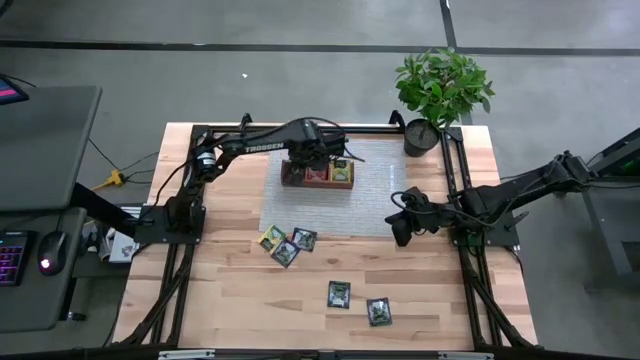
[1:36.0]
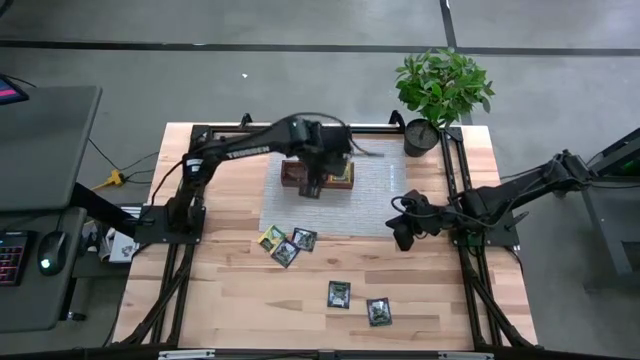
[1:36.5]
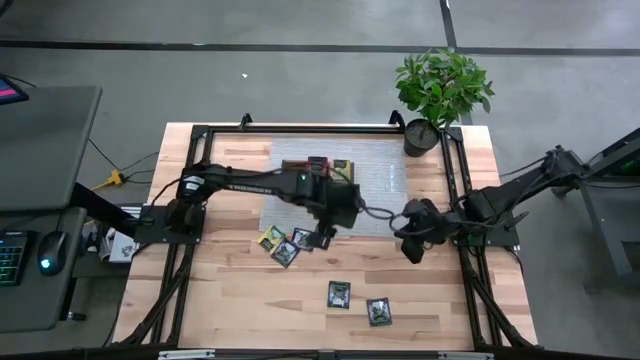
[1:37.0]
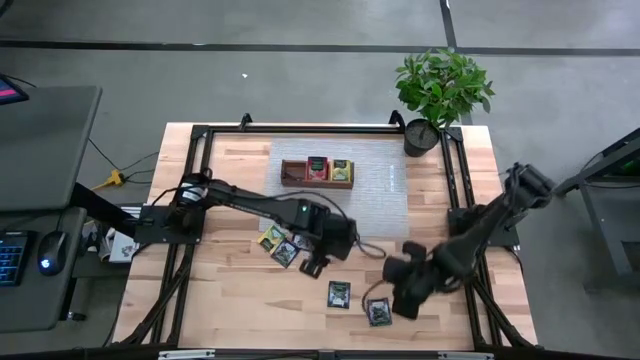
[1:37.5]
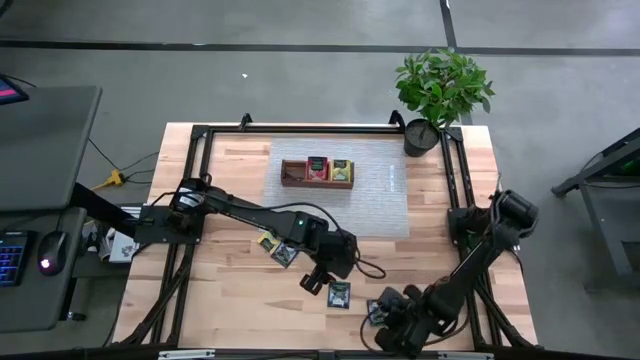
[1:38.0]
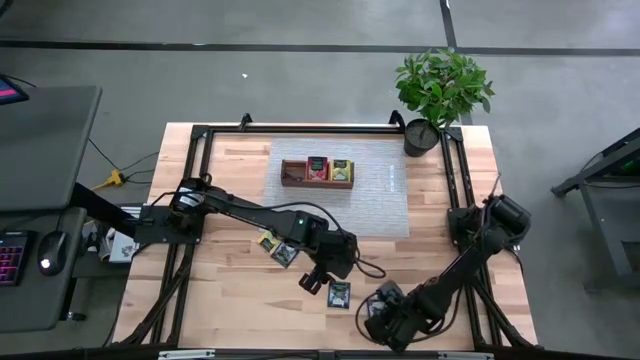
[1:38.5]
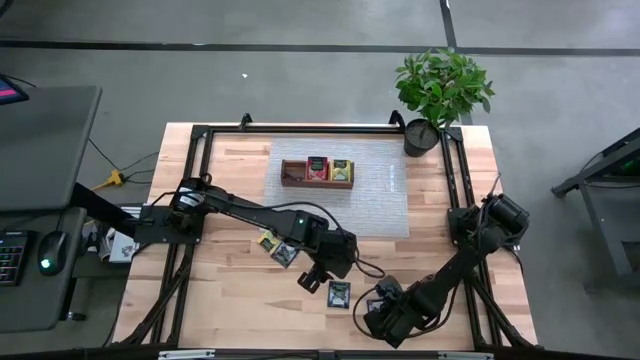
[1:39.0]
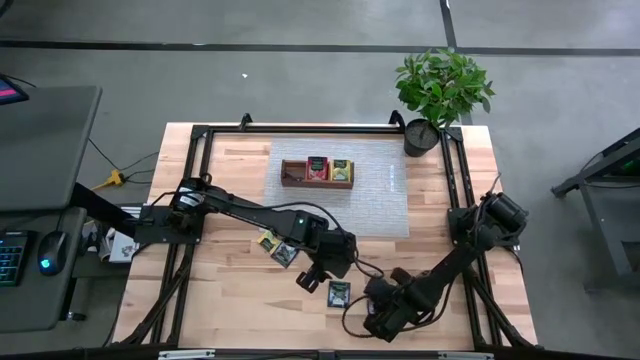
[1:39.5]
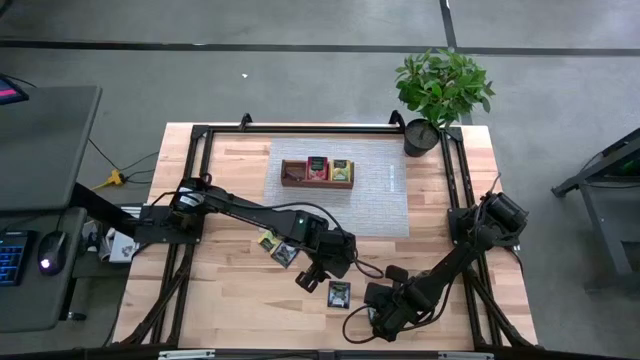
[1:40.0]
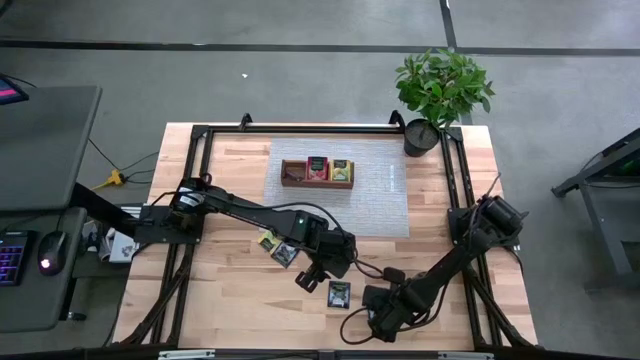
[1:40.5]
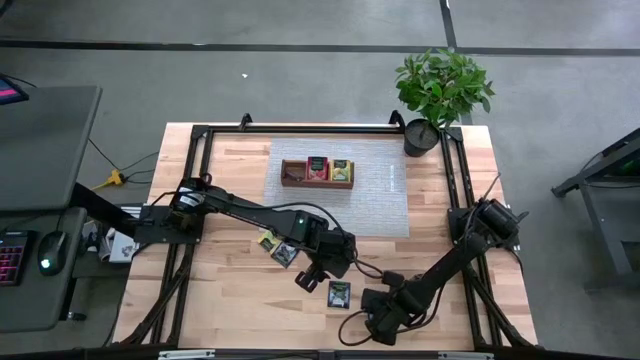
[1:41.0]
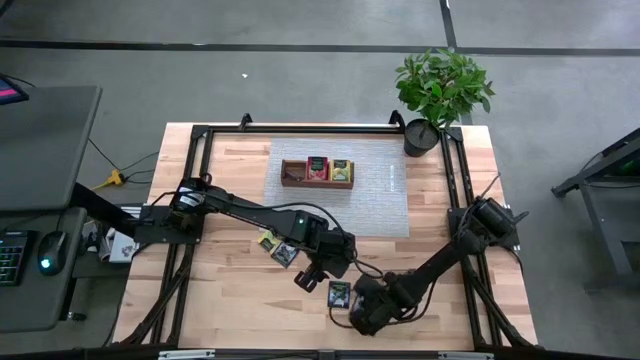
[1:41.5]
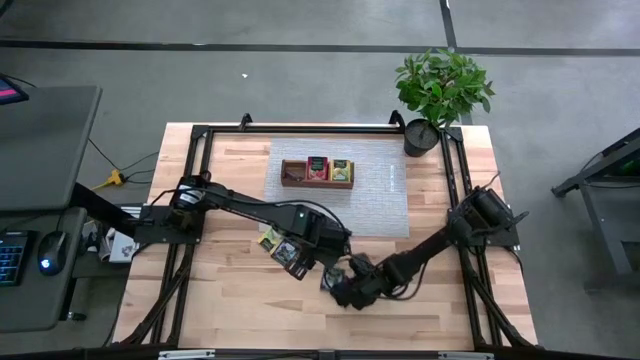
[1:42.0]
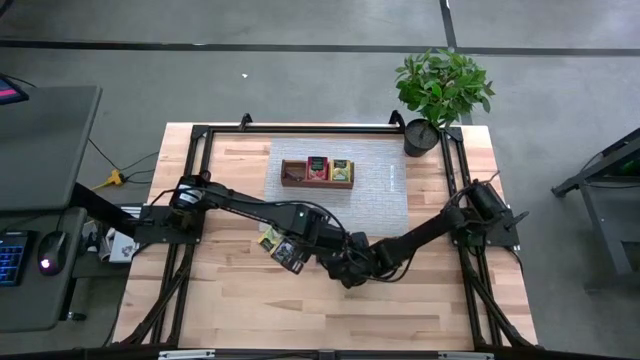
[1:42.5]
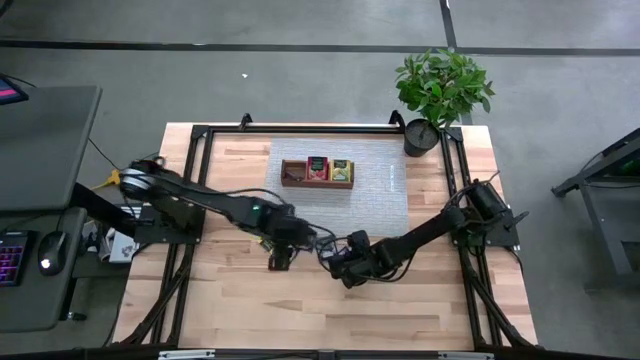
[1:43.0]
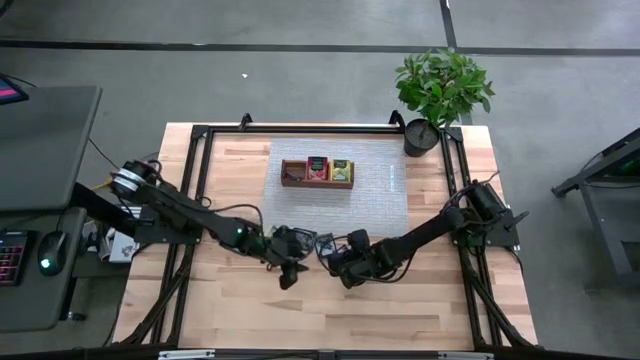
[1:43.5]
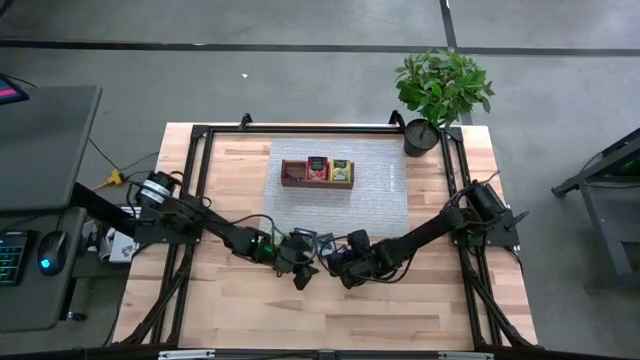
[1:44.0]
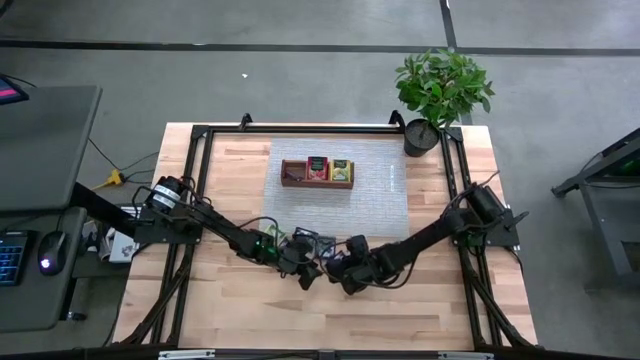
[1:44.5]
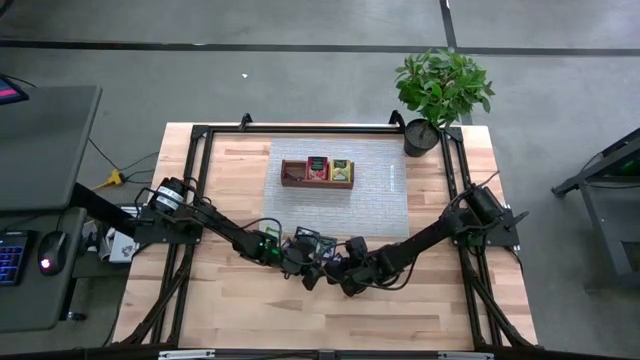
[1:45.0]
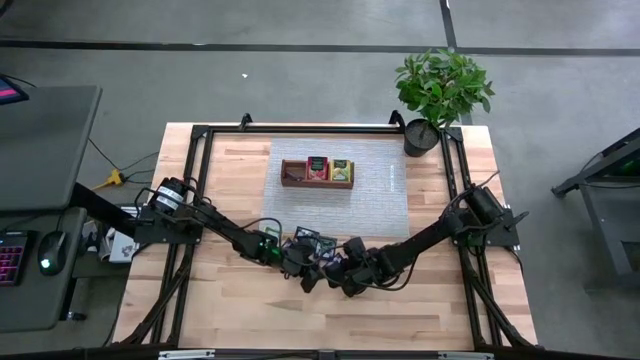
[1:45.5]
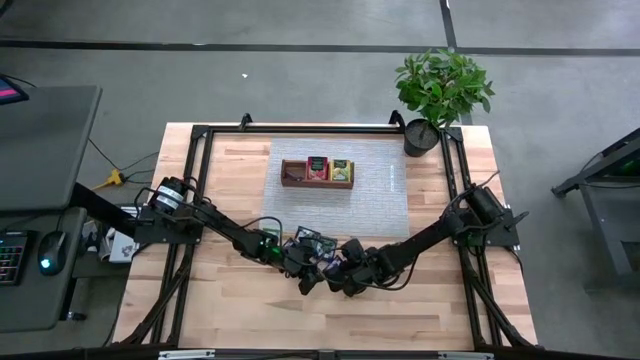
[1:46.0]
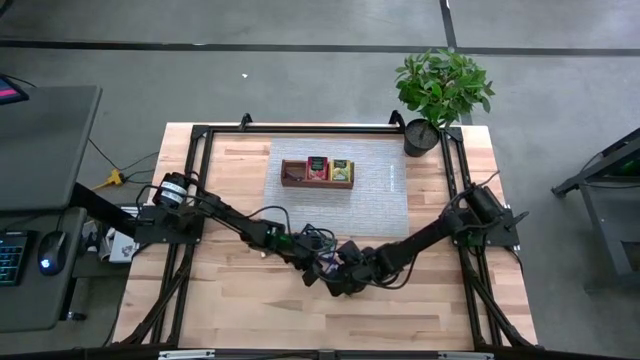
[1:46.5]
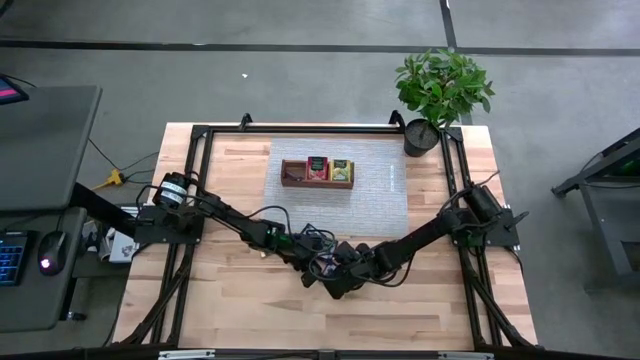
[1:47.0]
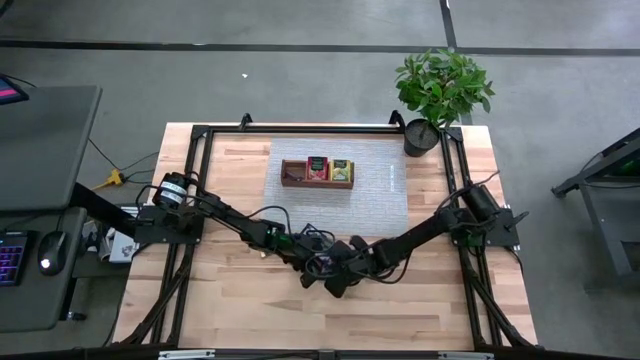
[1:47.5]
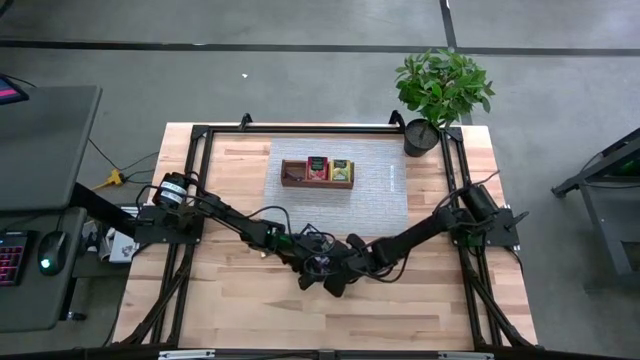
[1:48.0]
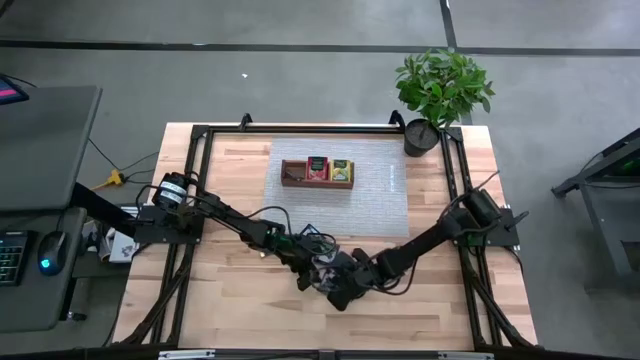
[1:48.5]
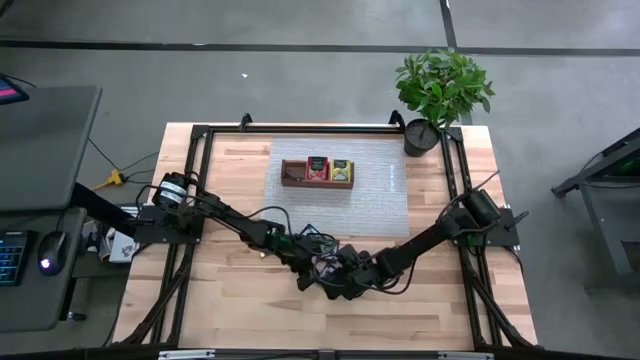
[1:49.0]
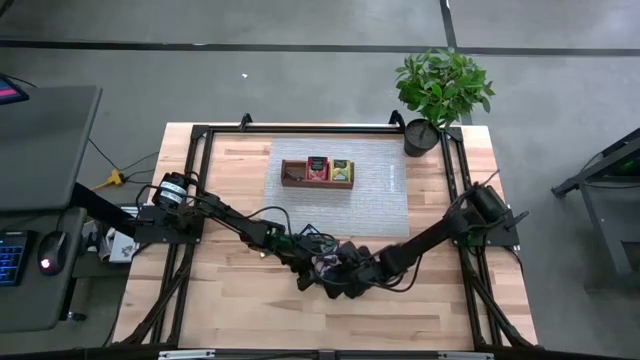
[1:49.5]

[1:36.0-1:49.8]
Task: Pick & Place Tea
Put the purple tea bag into the left section of the wooden organizer

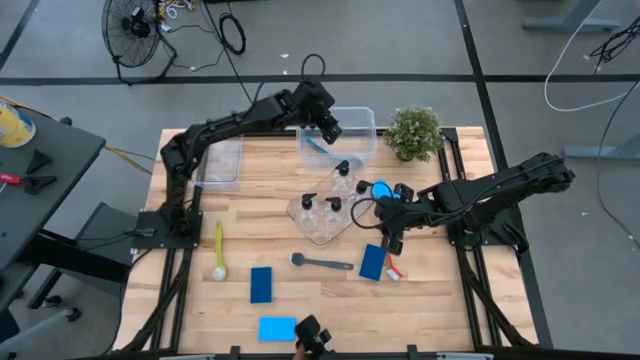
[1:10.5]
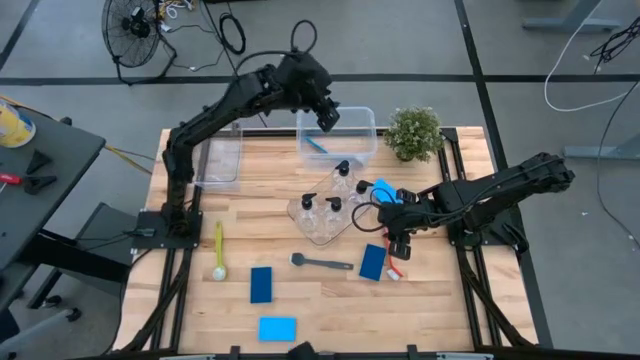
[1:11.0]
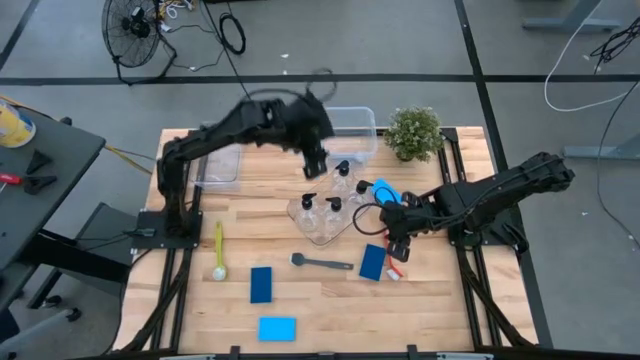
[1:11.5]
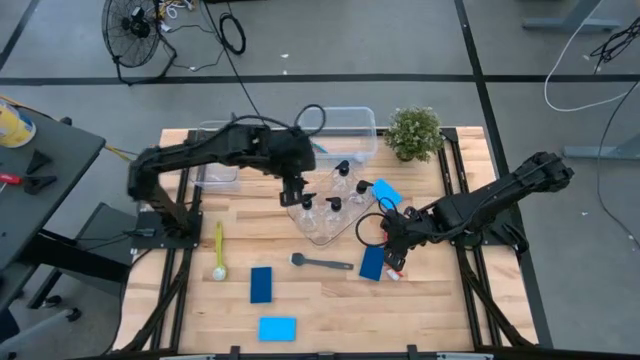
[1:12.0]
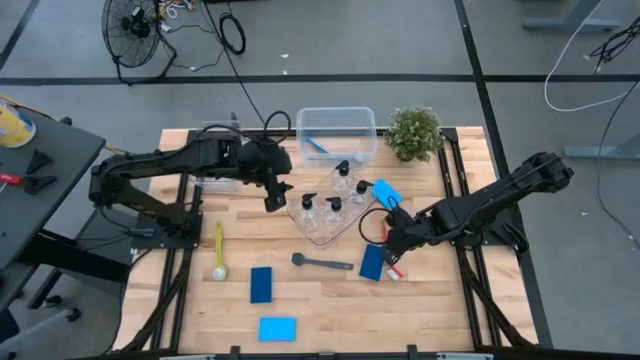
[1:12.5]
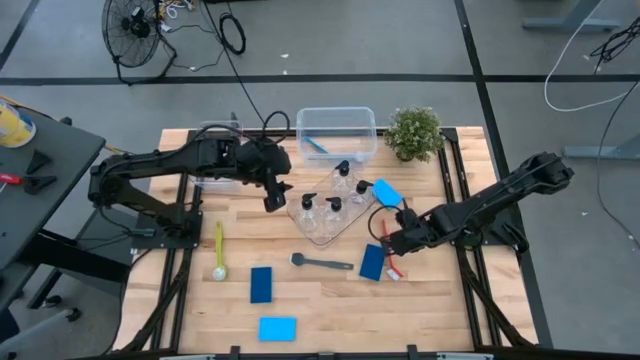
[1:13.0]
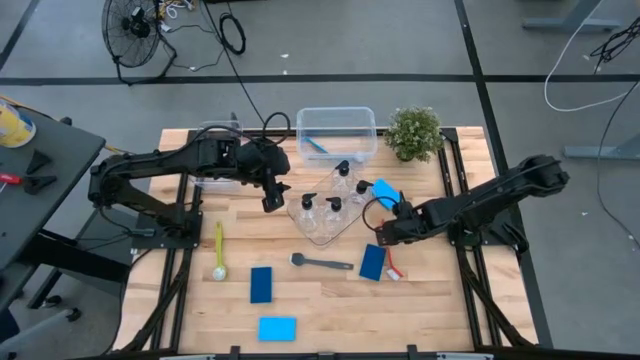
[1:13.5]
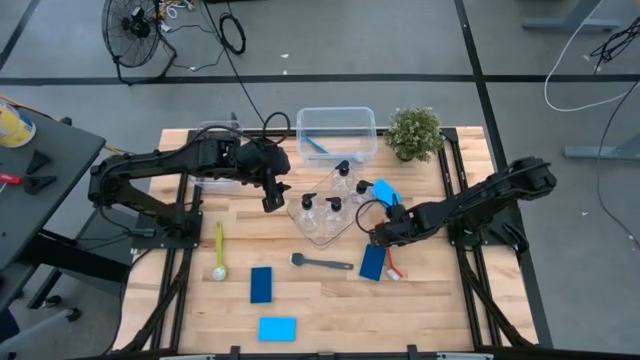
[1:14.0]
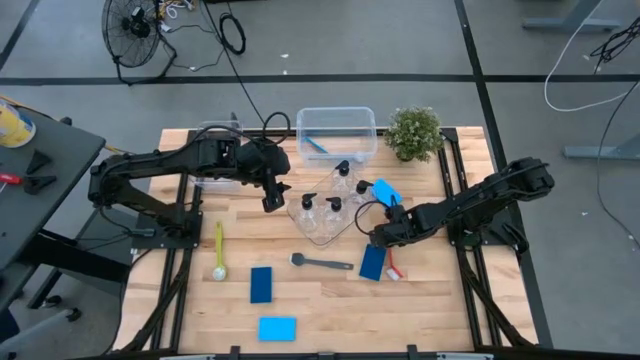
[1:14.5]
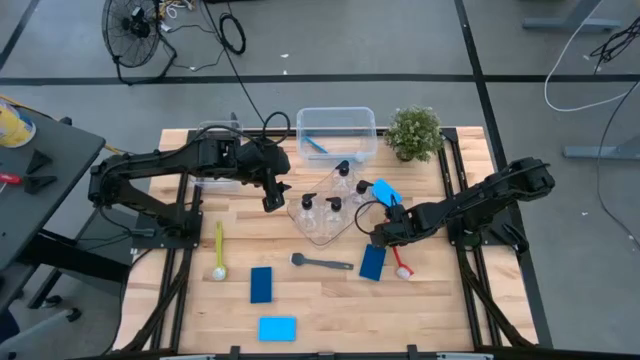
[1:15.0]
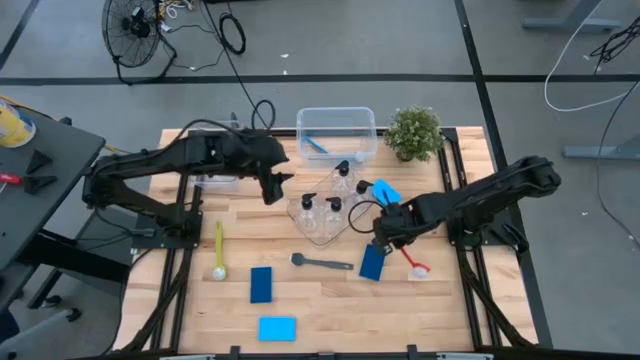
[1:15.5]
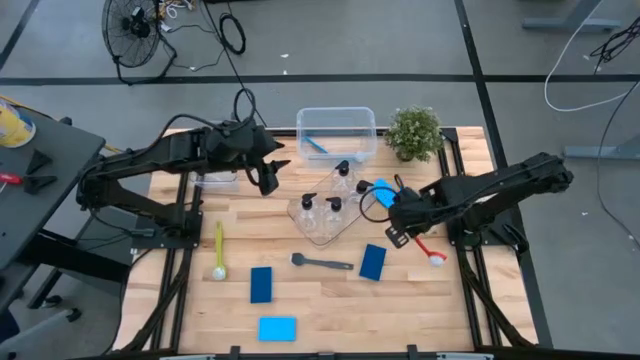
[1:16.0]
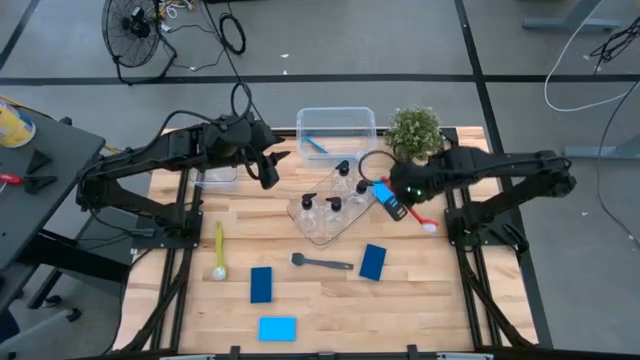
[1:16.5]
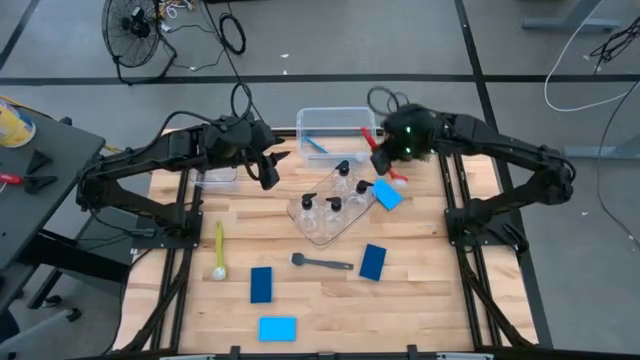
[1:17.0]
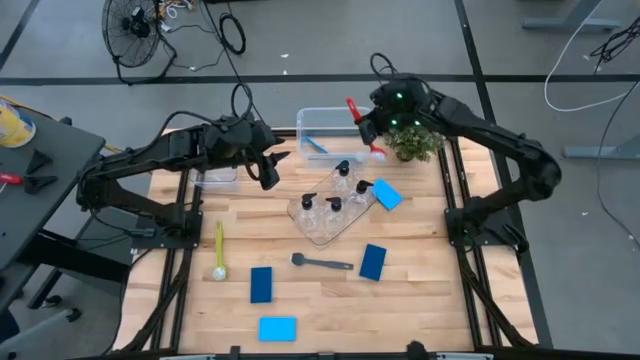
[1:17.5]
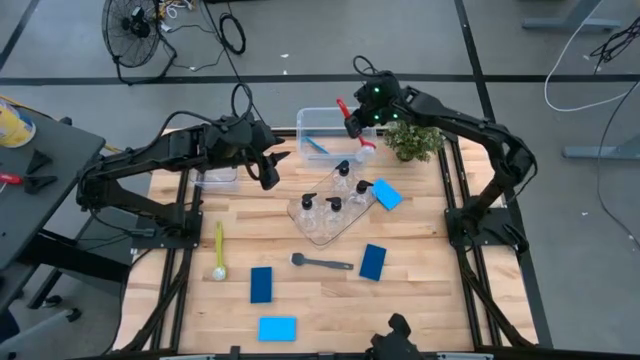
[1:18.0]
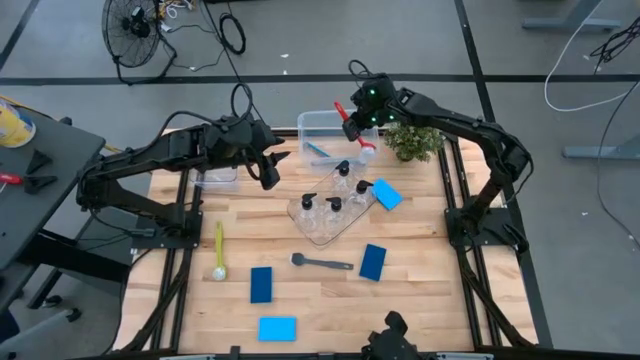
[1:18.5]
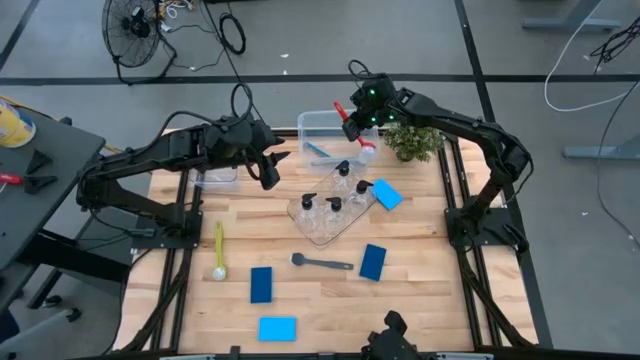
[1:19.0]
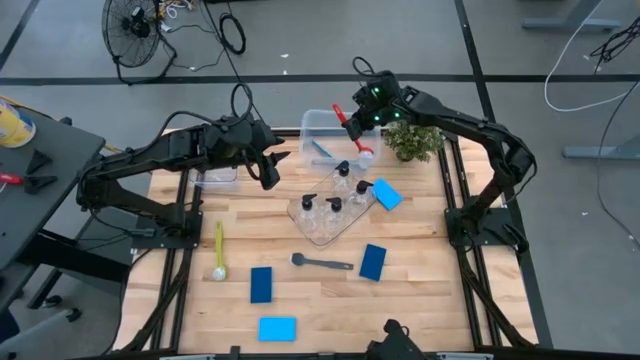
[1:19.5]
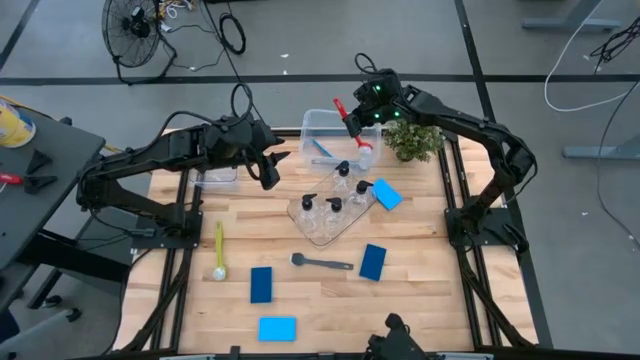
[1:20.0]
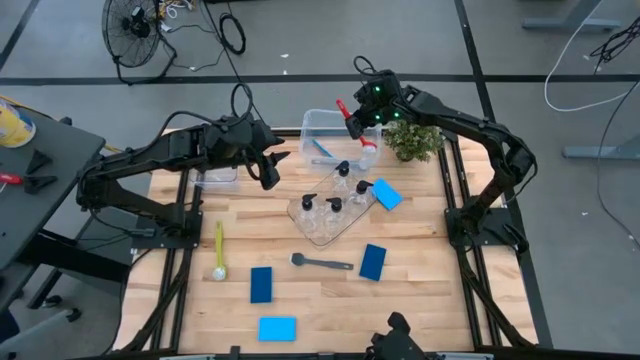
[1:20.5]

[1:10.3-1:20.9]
Task: Pick & Place Kitchen Sink Supplies
Put the orange dishwashing brush into the transparent container
